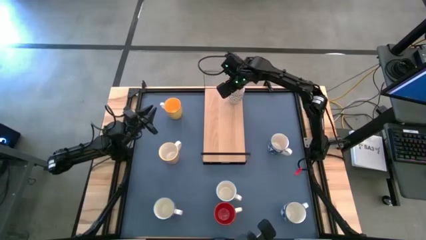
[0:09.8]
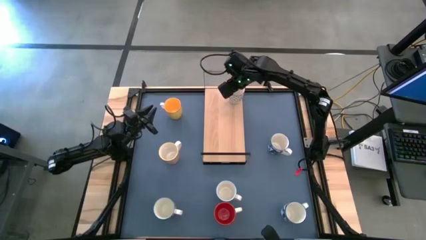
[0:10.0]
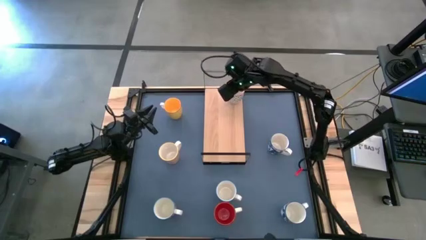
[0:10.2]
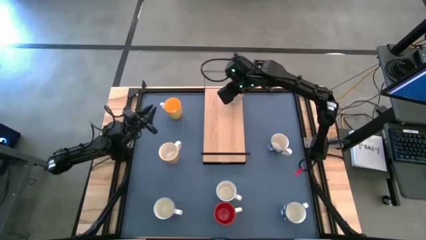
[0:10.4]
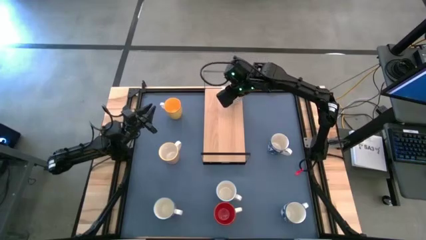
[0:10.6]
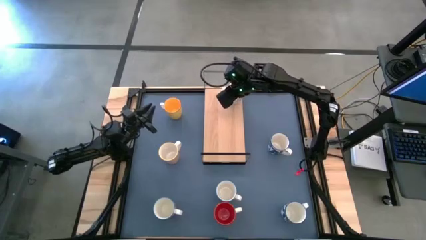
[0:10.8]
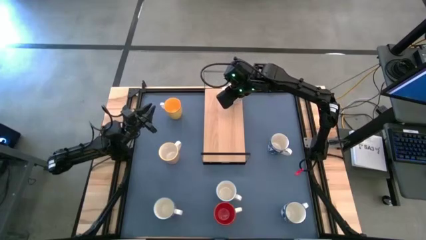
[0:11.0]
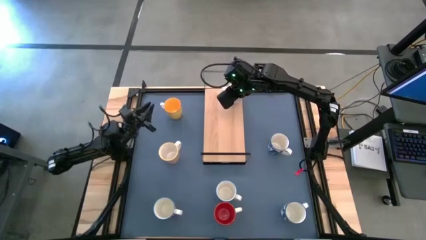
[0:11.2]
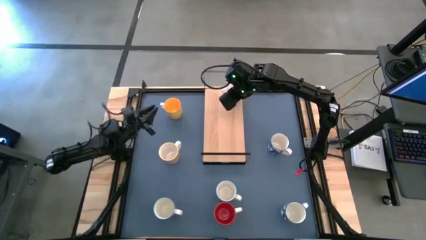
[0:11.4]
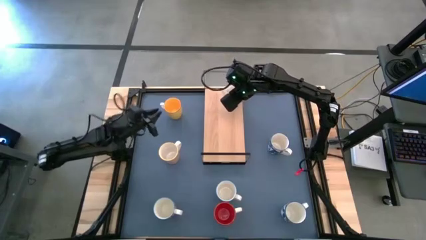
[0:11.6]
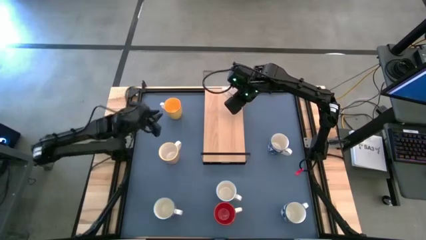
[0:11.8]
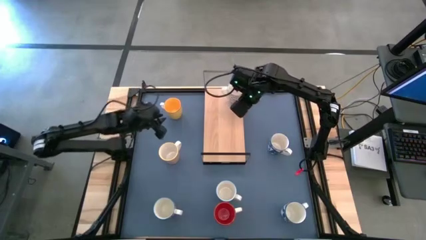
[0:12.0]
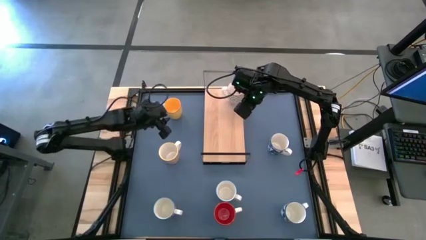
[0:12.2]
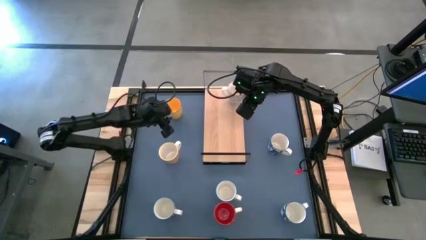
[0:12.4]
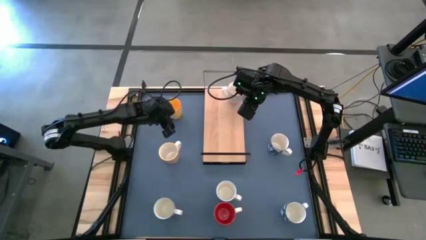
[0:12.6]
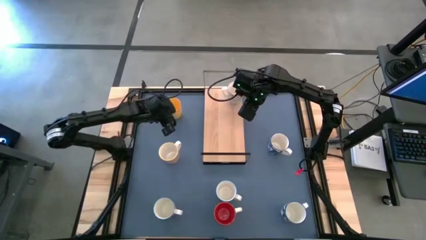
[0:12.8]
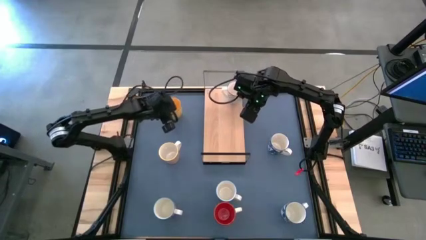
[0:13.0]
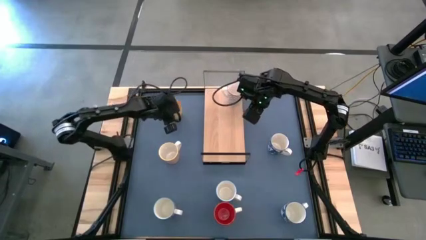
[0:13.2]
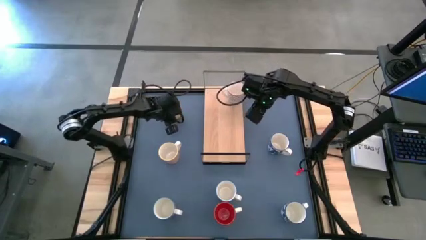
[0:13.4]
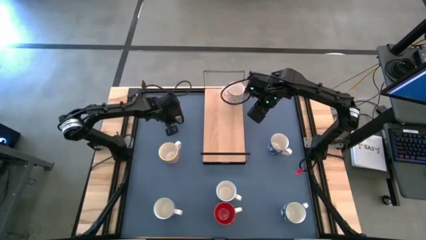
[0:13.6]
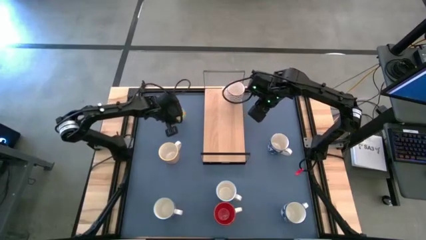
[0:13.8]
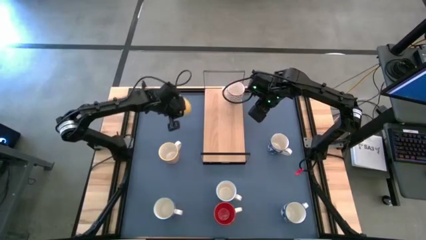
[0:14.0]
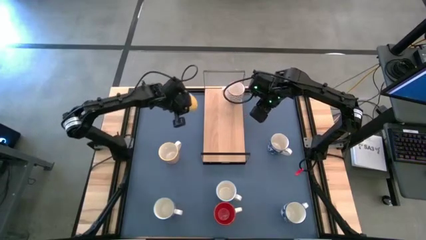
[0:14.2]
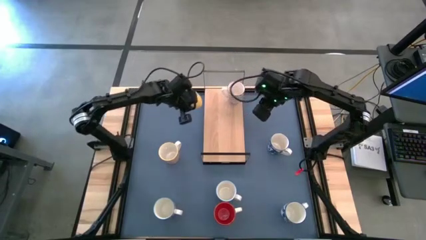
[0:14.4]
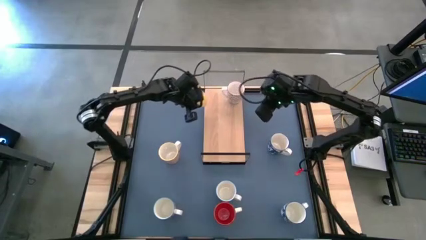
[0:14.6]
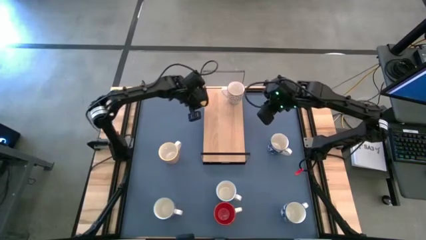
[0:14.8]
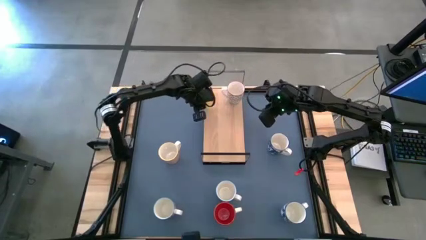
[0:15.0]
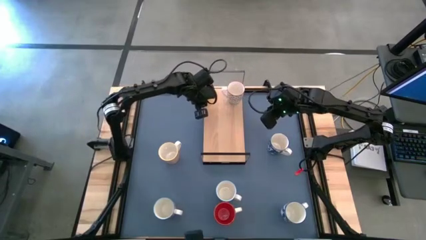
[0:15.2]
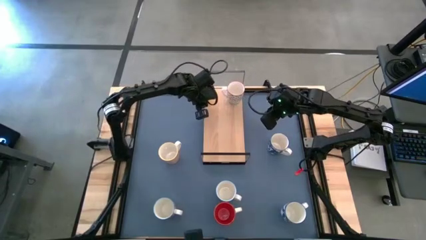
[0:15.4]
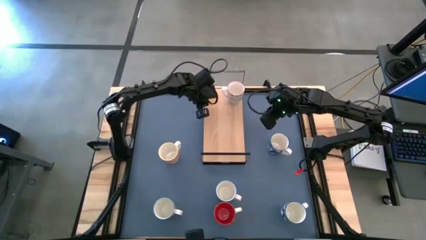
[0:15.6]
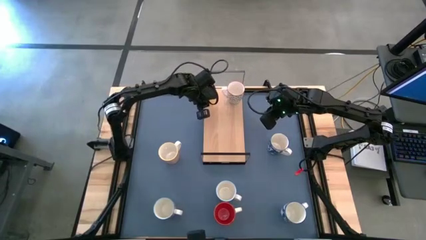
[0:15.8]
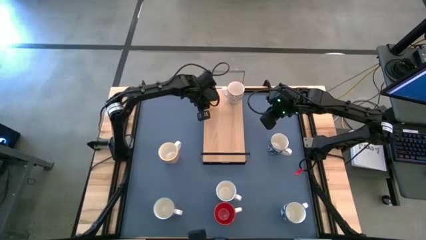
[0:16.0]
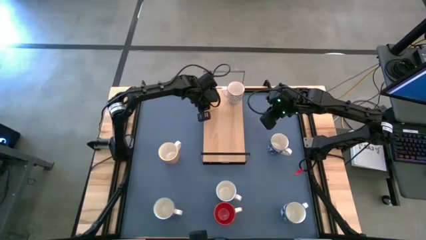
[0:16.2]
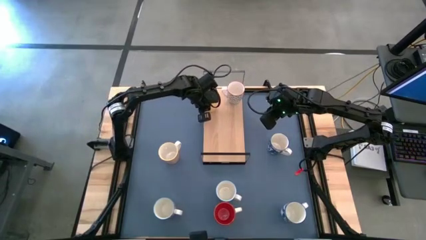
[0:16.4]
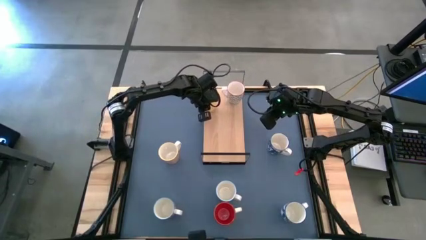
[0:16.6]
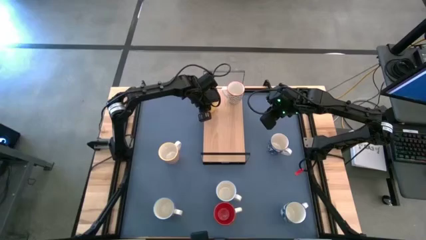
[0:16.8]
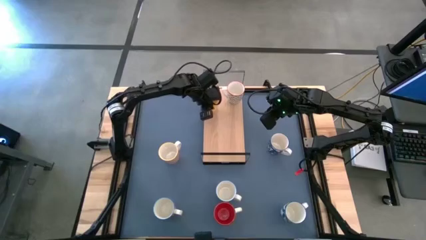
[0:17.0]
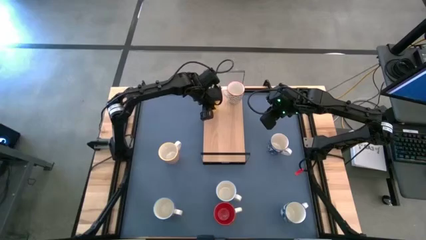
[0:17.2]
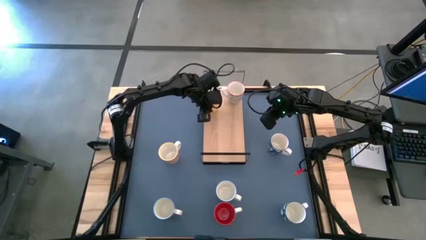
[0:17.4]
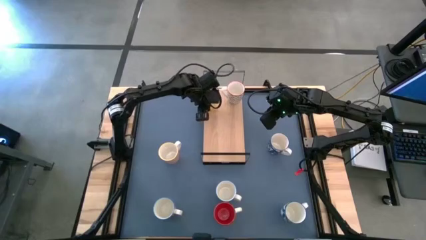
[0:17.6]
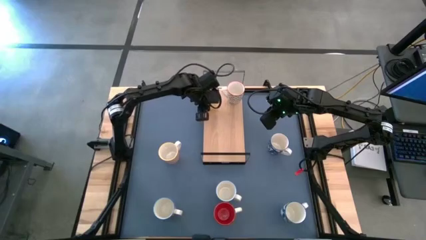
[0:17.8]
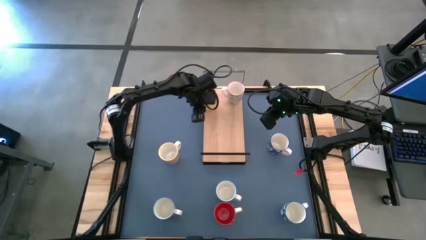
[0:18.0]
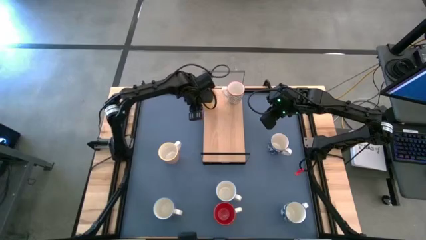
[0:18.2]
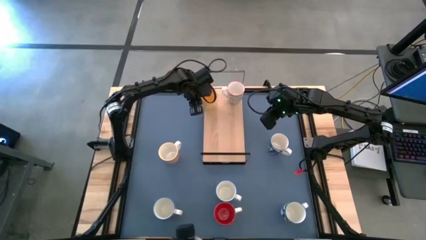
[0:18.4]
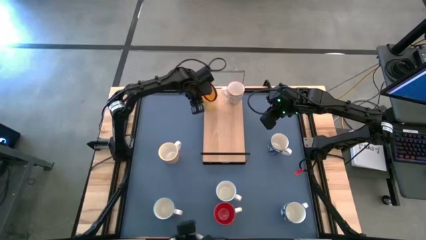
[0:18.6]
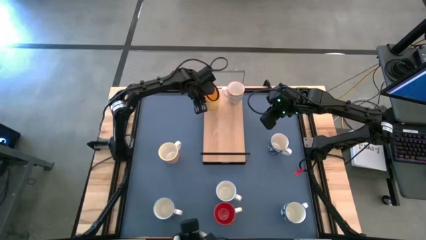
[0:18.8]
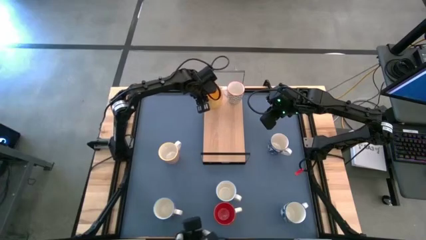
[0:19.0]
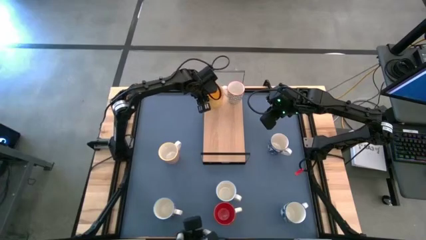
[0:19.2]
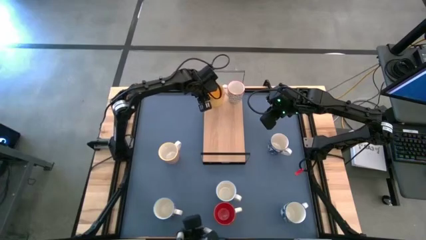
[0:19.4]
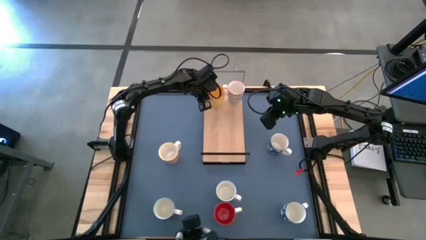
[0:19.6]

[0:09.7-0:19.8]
Task: Place coffee mugs
Put the yellow mug on the shelf

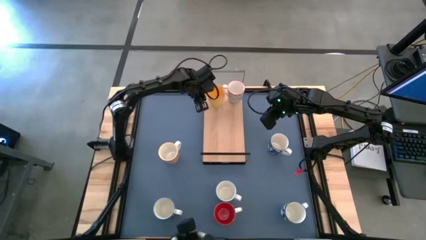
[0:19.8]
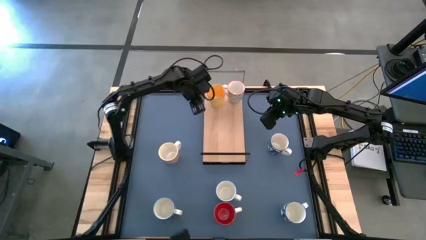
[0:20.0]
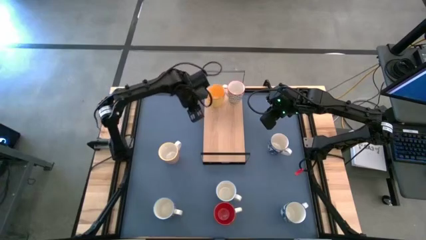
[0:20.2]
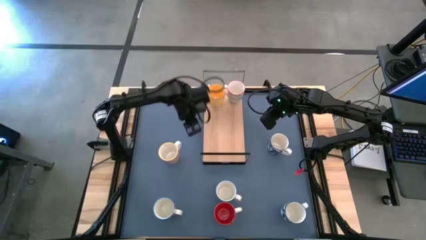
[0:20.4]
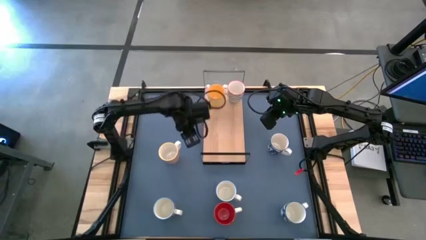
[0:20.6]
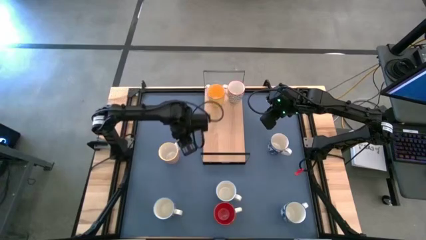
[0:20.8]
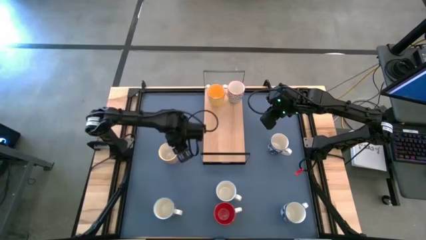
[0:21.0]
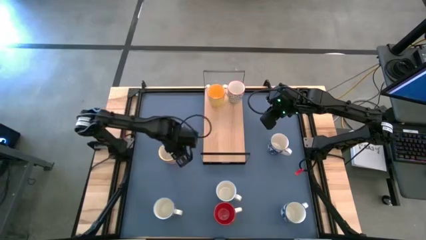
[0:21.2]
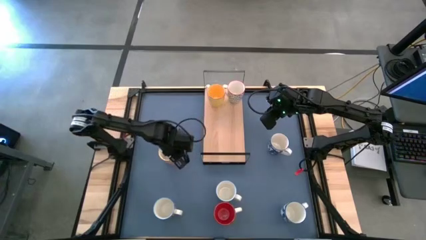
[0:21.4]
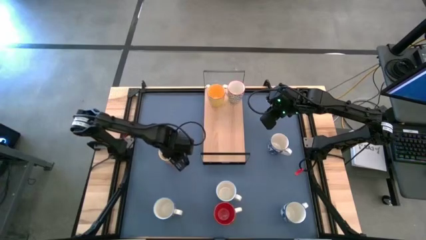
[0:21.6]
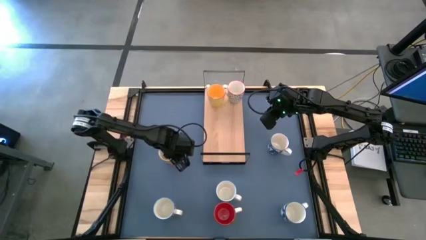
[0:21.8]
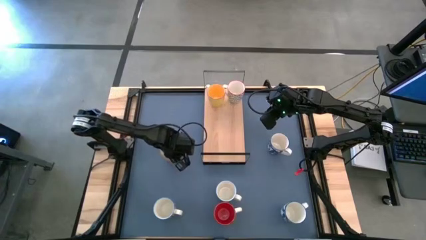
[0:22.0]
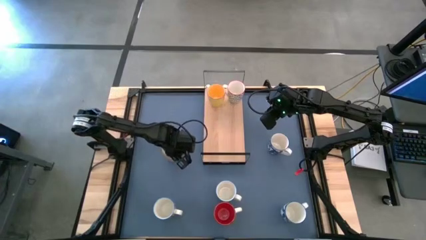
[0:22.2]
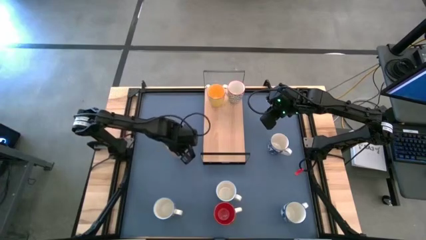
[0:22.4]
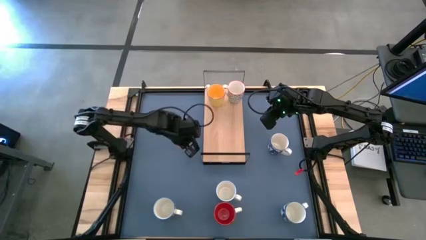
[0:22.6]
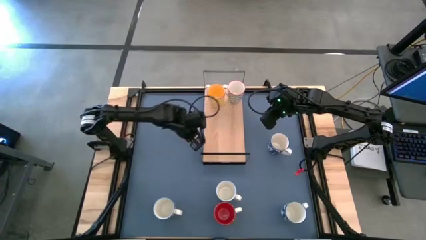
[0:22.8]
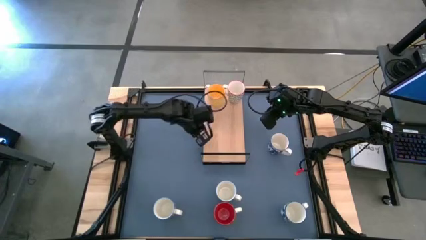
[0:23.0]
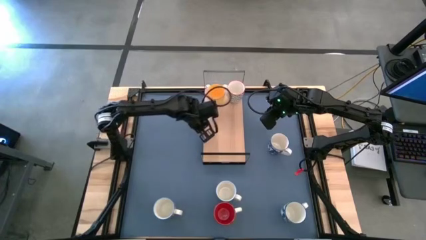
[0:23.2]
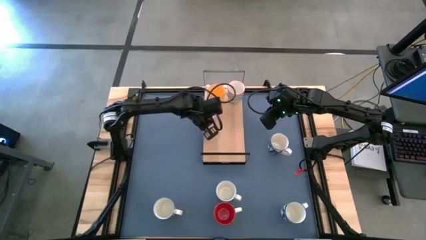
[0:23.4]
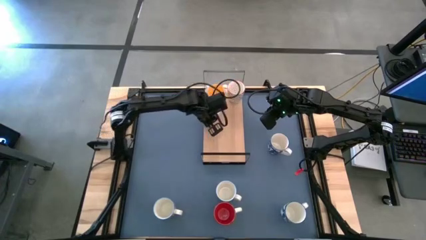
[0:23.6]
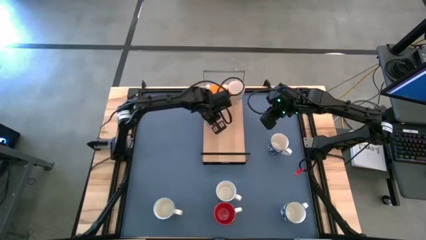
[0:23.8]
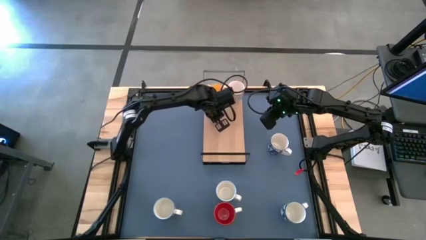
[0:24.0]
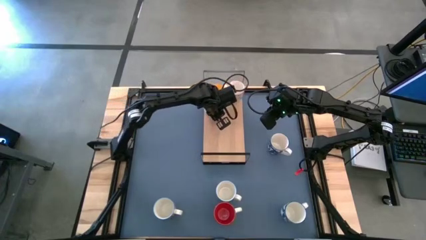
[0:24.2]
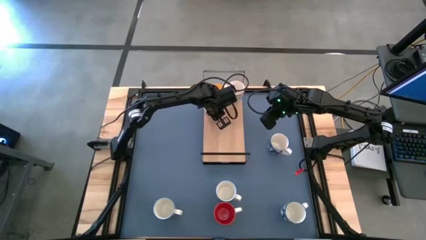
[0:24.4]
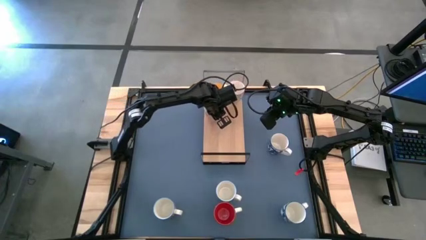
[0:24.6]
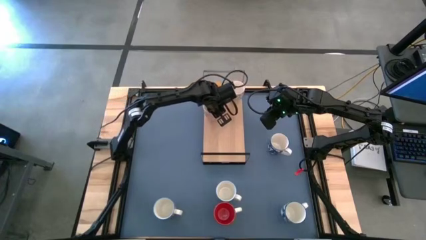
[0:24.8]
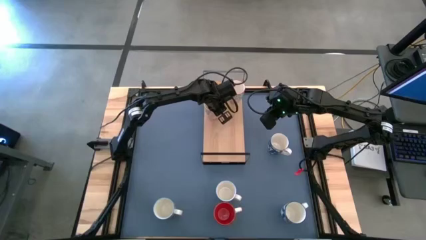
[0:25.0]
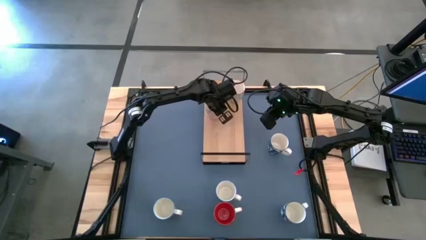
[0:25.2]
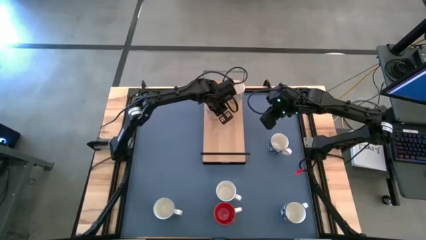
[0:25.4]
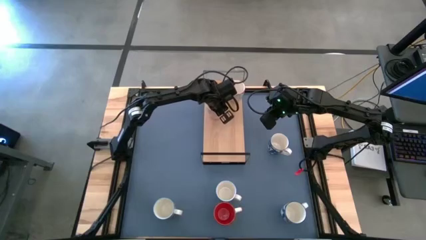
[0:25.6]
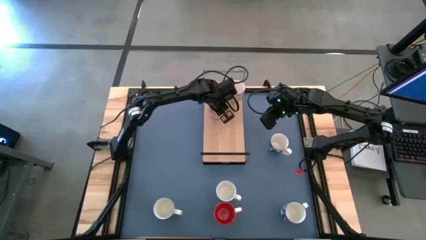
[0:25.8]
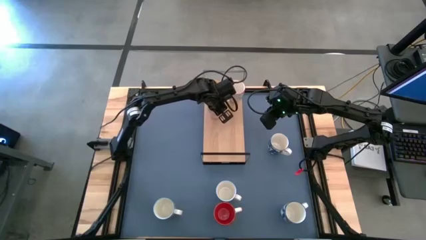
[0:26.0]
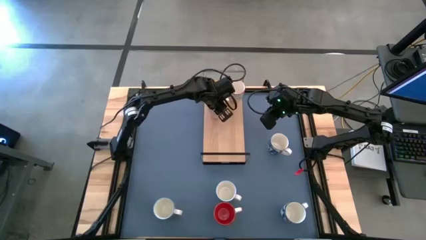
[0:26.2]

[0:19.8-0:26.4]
Put the orange mug on the shelf
